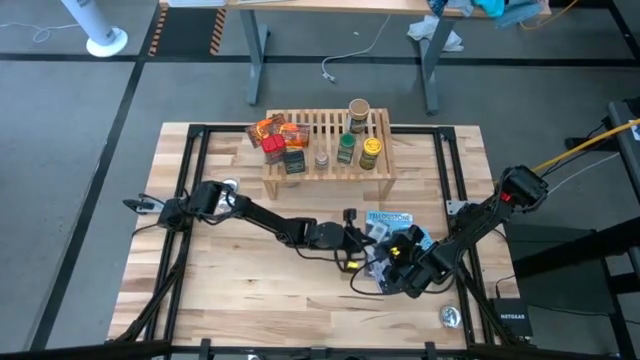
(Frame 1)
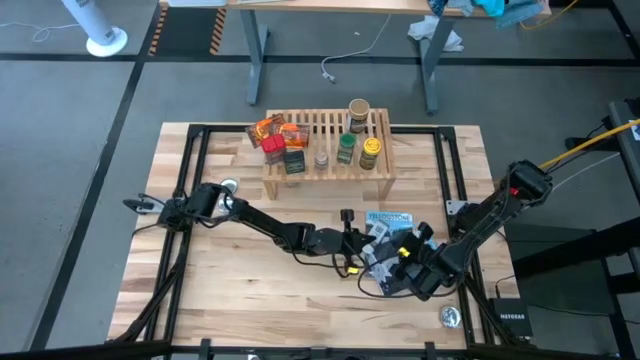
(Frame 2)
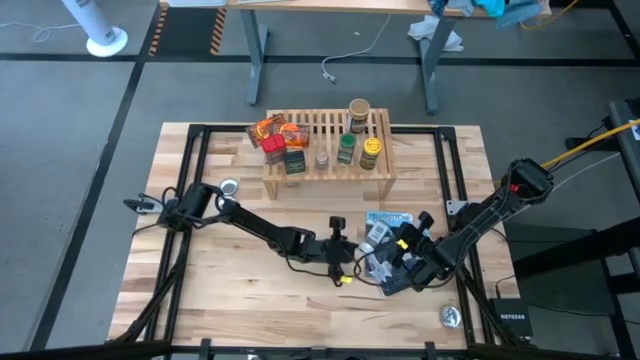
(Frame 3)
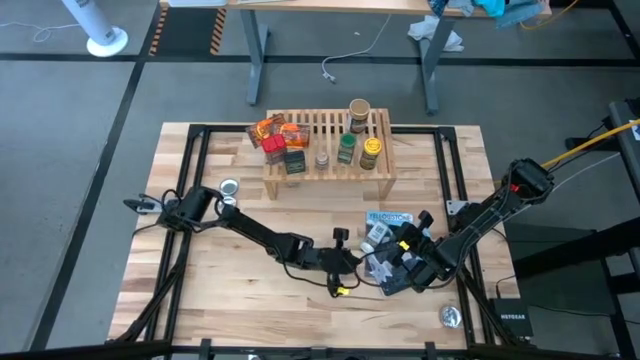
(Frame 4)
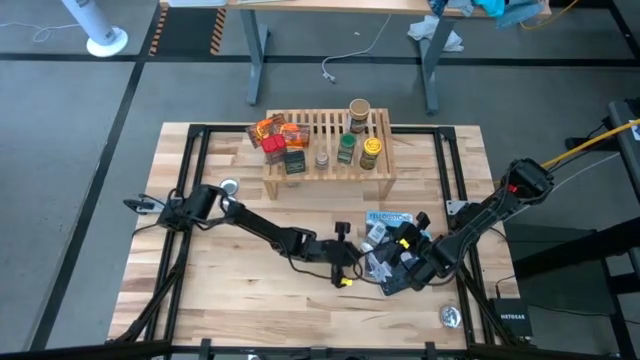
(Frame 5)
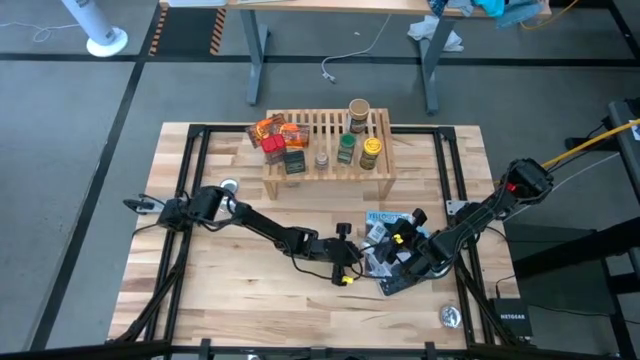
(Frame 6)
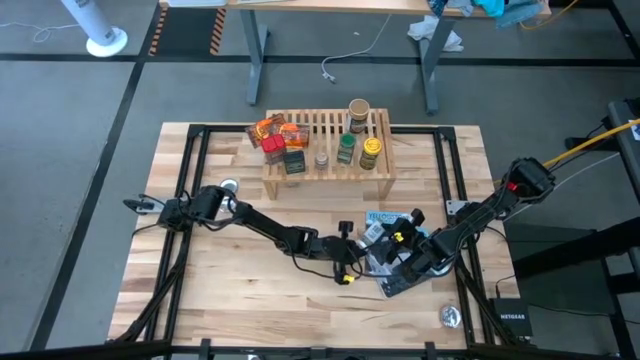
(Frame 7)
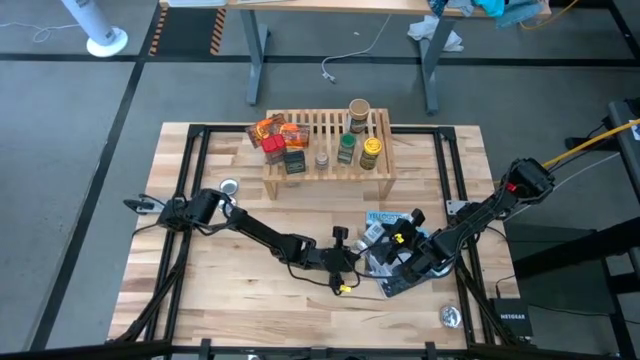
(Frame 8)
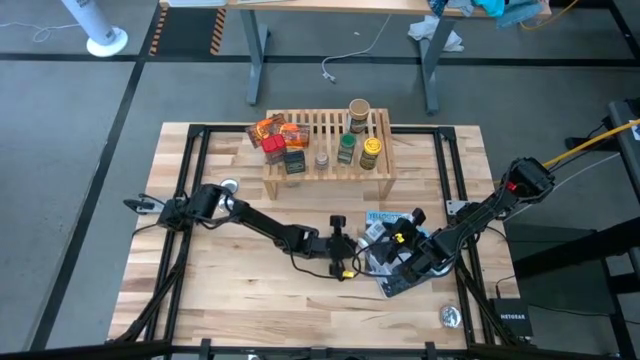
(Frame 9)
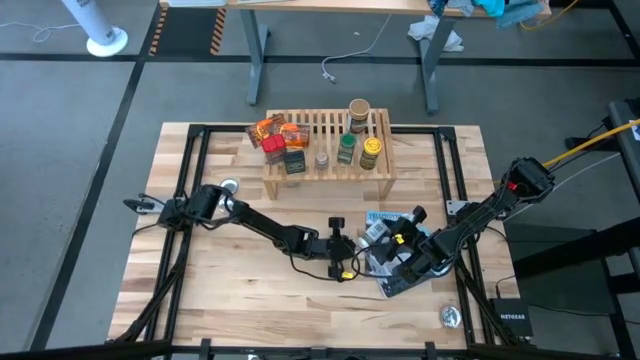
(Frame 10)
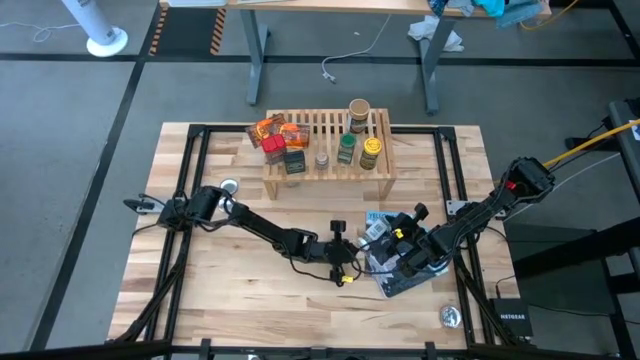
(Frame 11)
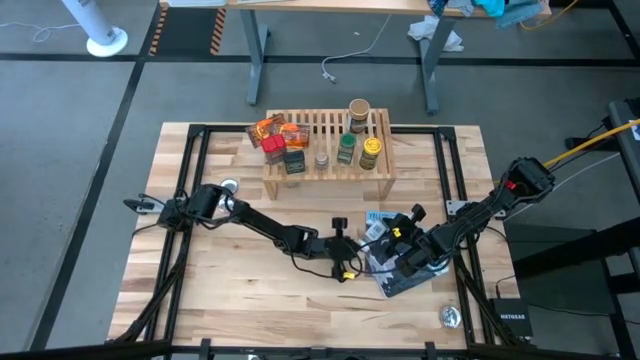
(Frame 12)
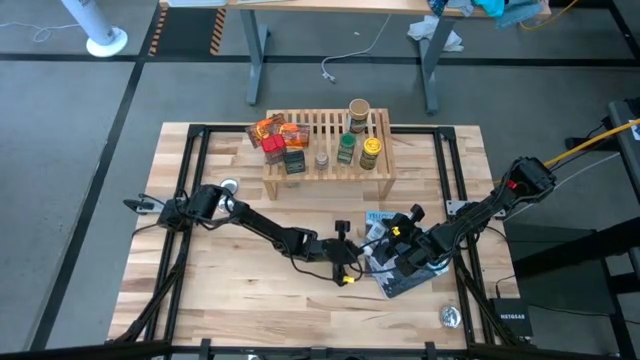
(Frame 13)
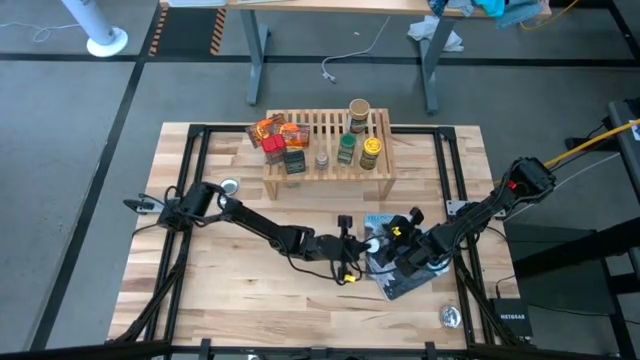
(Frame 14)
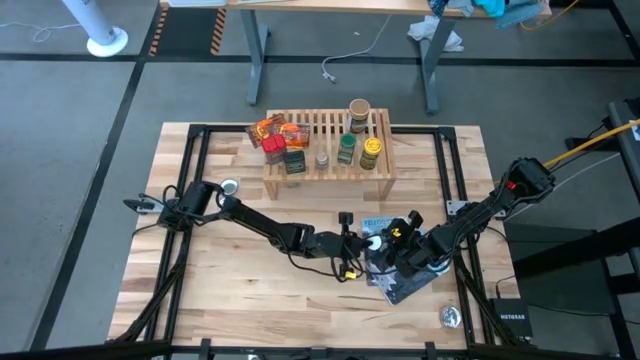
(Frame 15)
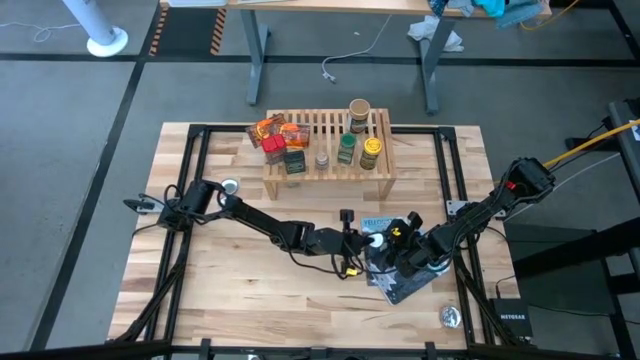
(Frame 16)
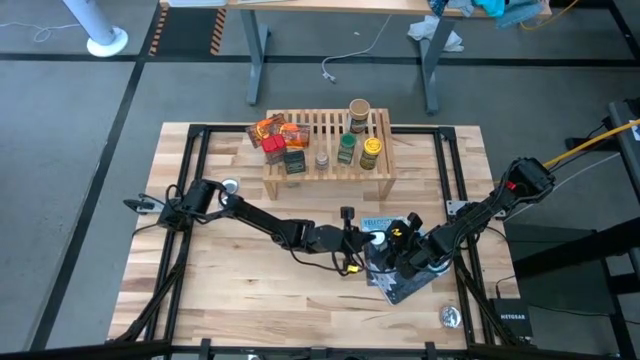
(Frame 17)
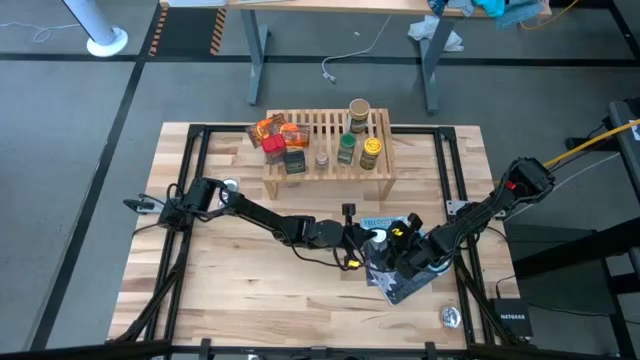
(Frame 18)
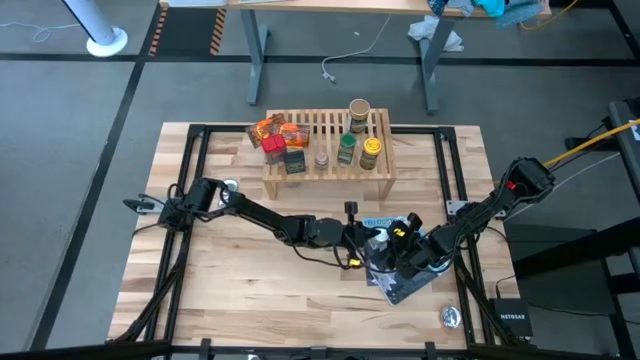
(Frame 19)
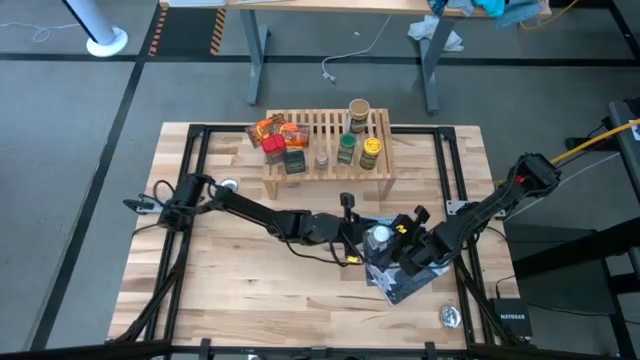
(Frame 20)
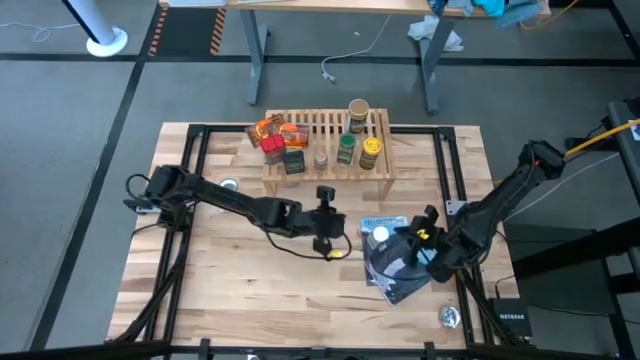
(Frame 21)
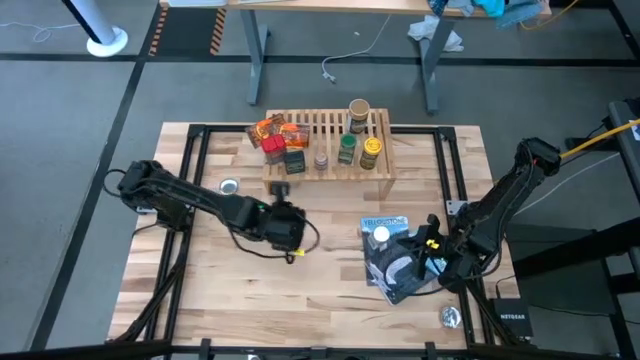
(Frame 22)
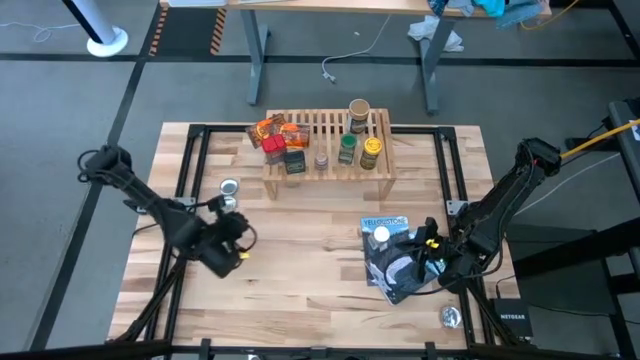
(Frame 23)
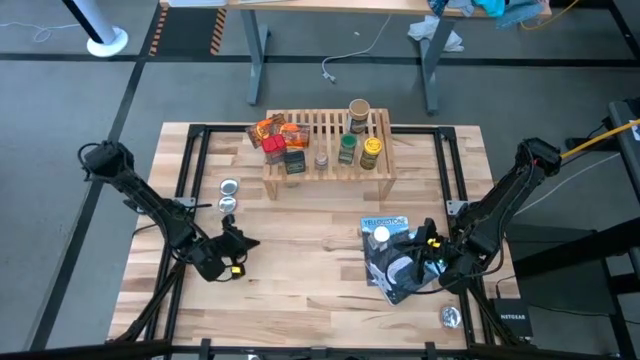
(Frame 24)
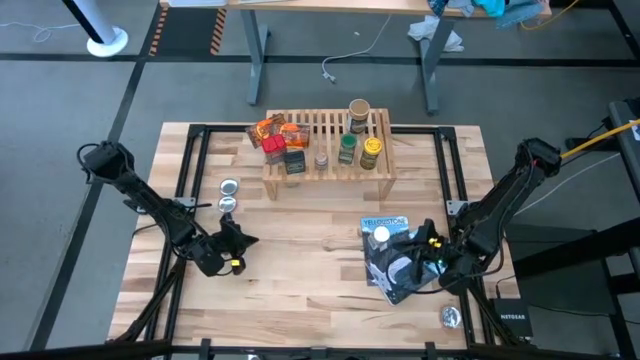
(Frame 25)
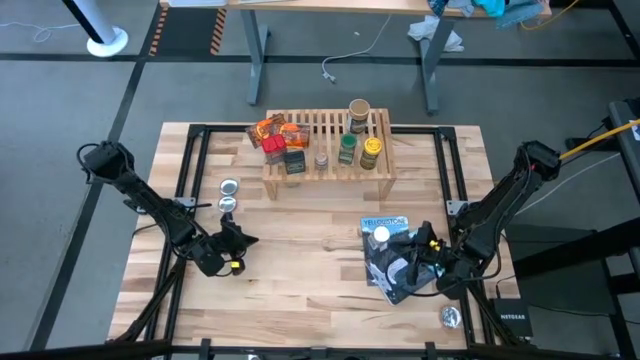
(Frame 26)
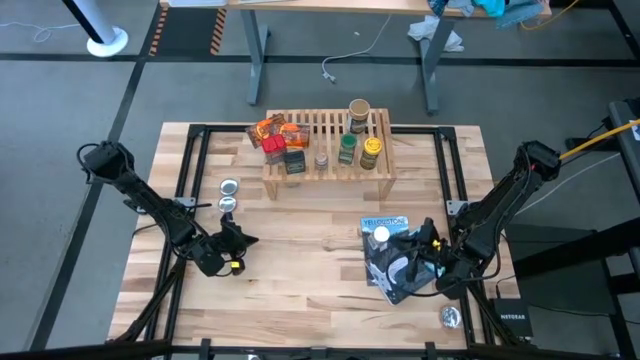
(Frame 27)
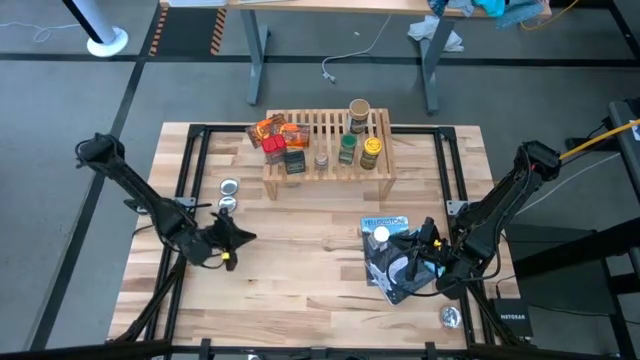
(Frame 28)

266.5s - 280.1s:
Task: Shelf spices
Put the white seasoning bottle on the shelf

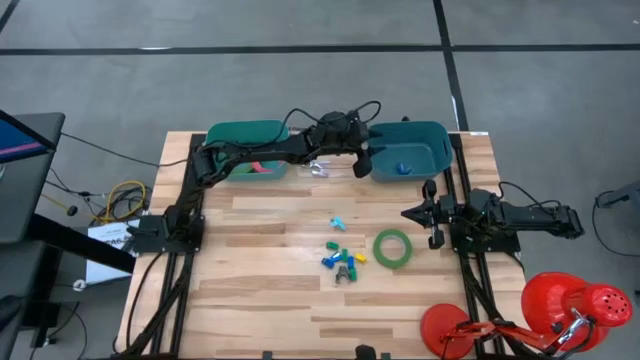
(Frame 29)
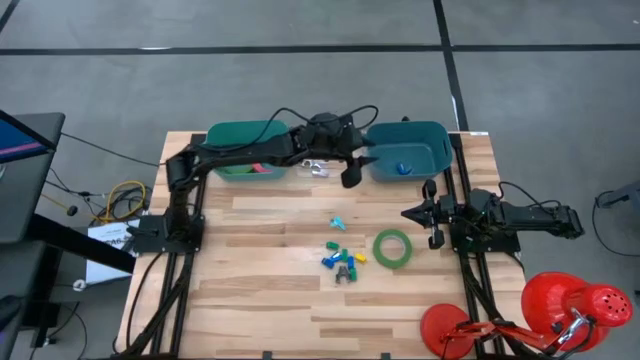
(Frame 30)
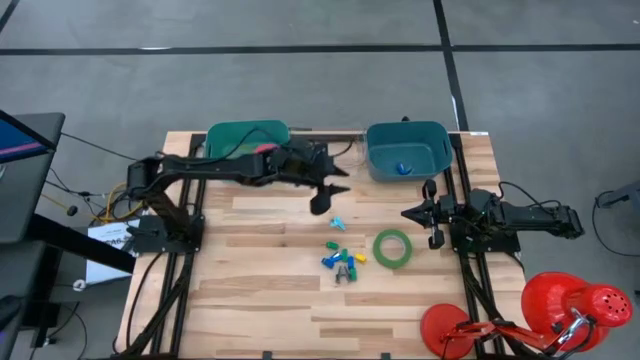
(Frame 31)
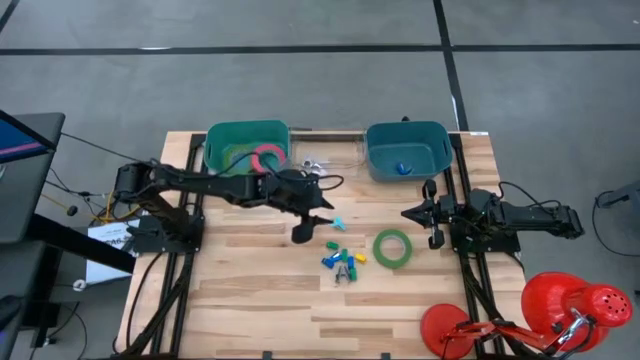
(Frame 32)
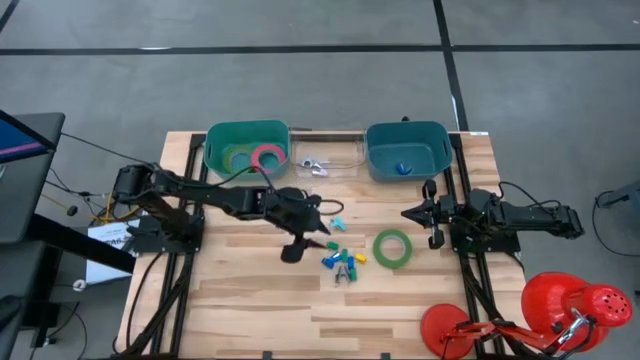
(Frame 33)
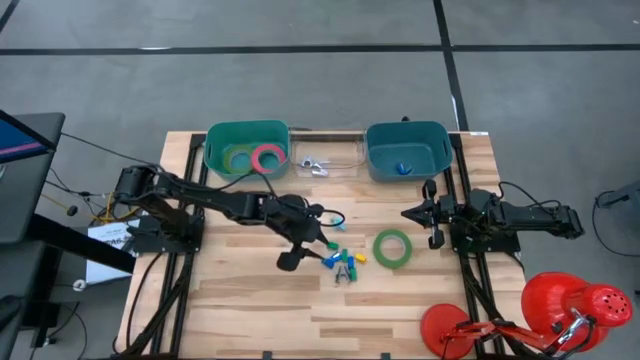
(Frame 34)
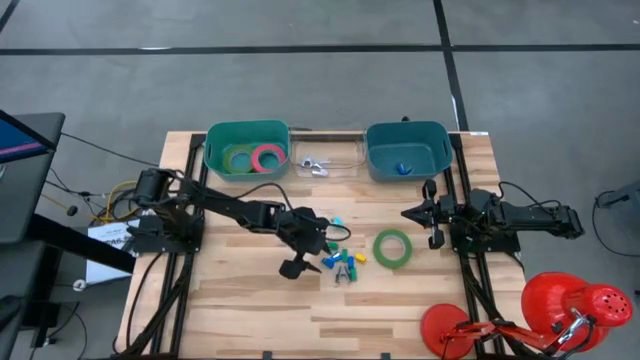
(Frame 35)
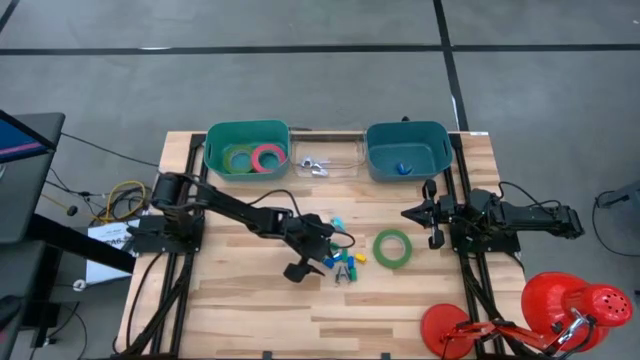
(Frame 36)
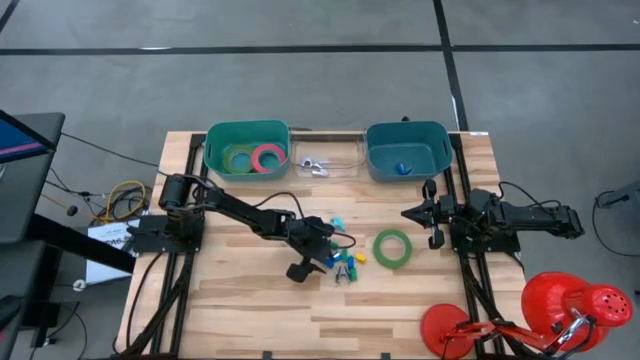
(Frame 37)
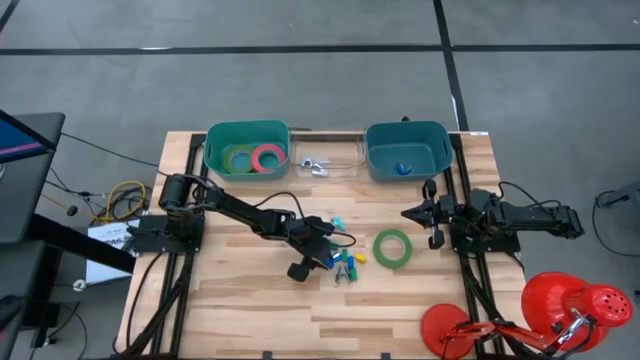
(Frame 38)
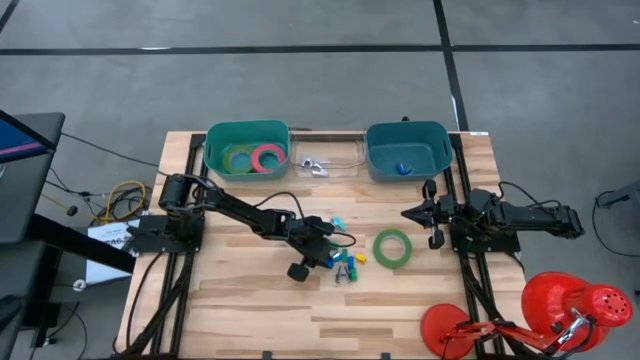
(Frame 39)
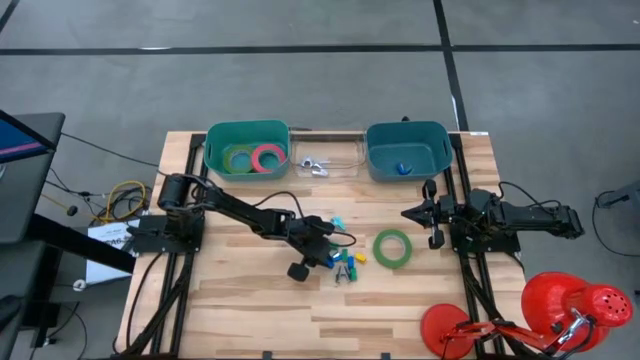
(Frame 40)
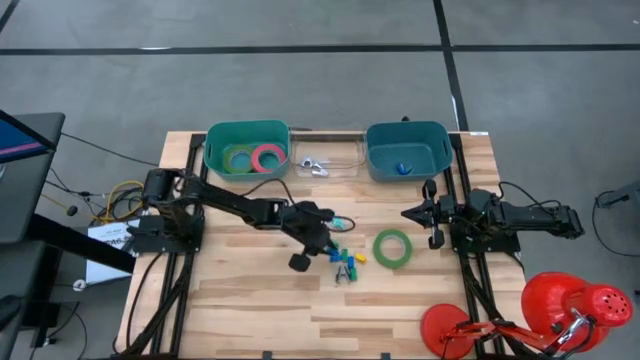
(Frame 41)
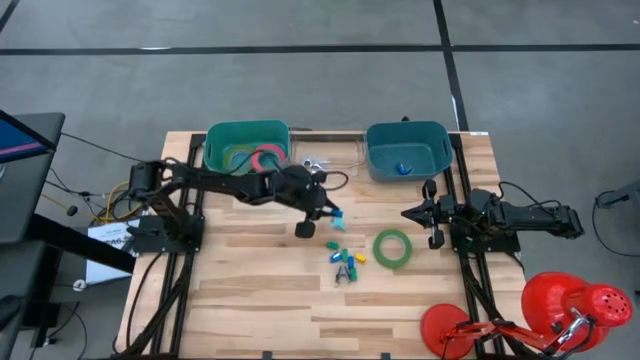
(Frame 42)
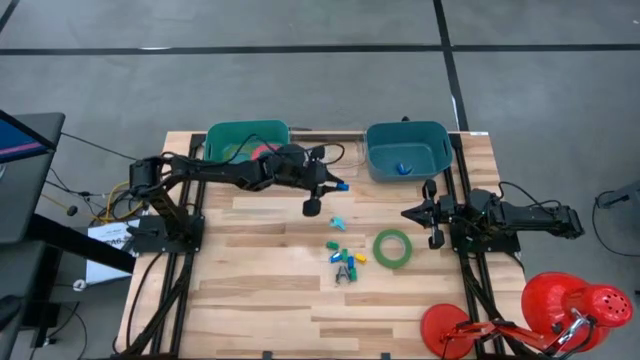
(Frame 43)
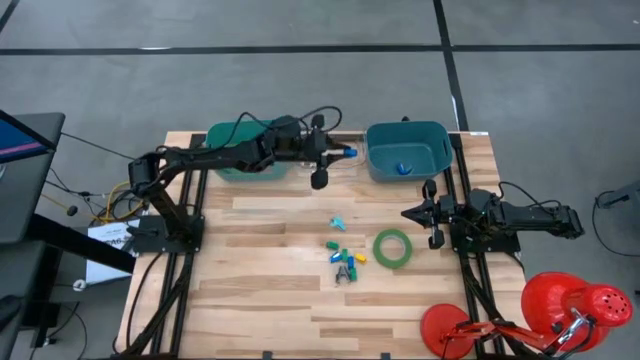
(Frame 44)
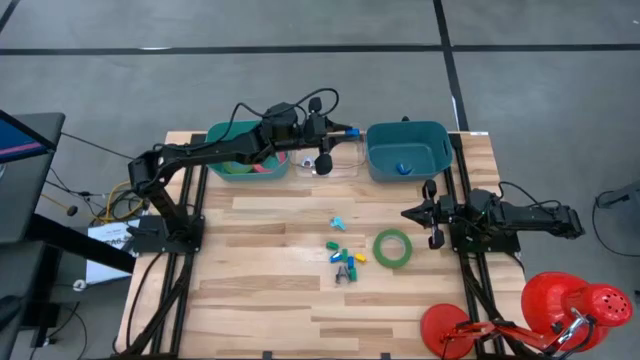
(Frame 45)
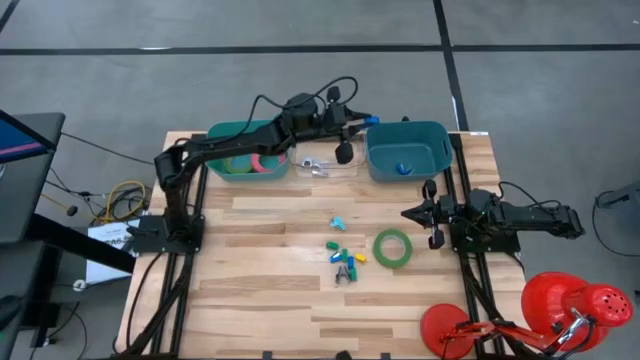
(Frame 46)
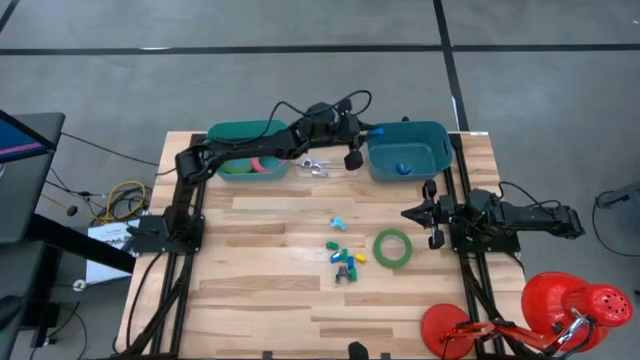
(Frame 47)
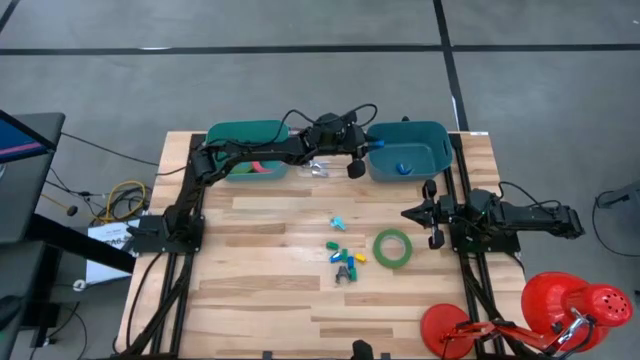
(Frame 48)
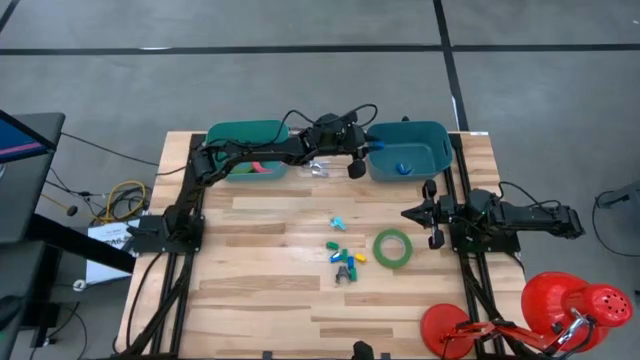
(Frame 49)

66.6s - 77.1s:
Task: Pick and place Stapler, Stapler remover, tape
Put the blue stapler into the dark blue bin
